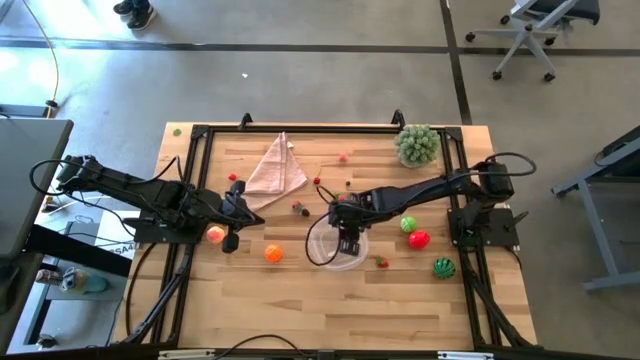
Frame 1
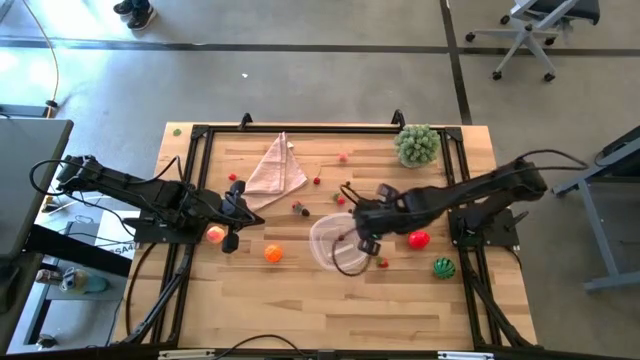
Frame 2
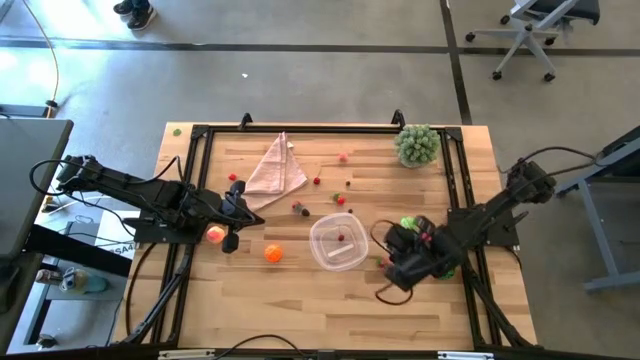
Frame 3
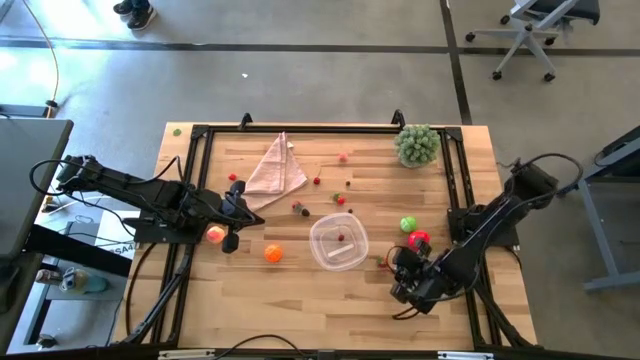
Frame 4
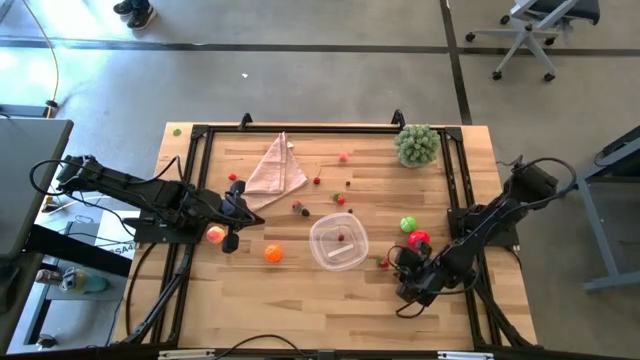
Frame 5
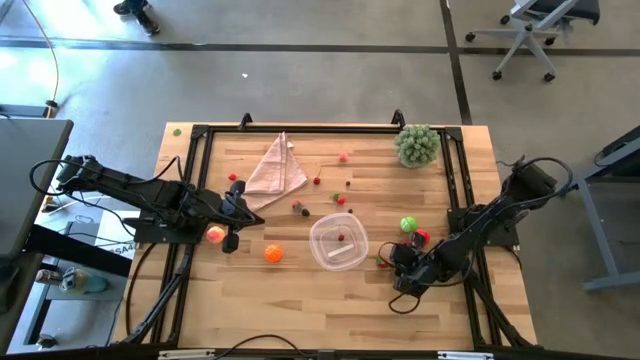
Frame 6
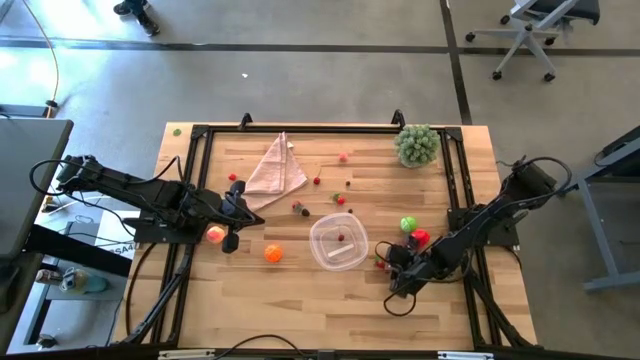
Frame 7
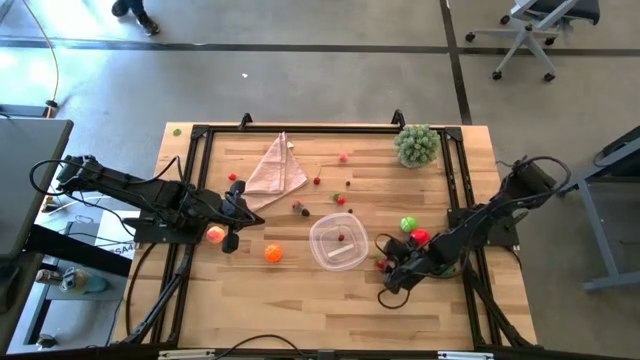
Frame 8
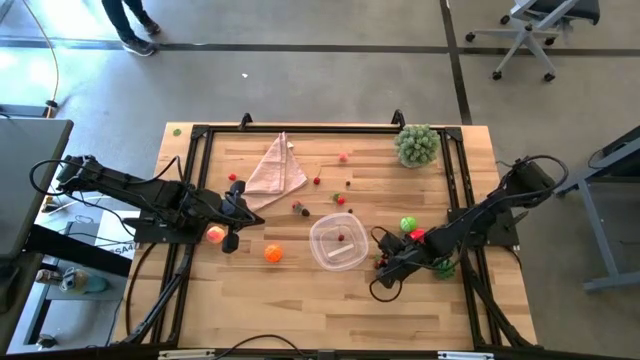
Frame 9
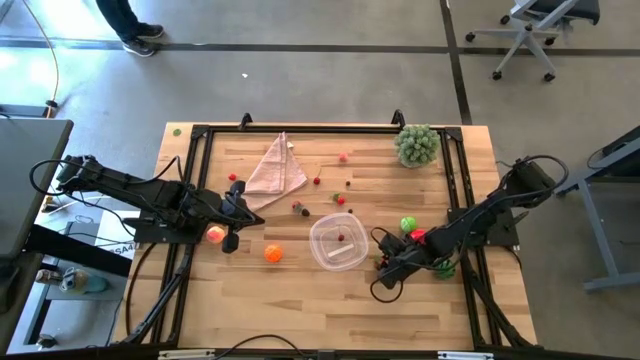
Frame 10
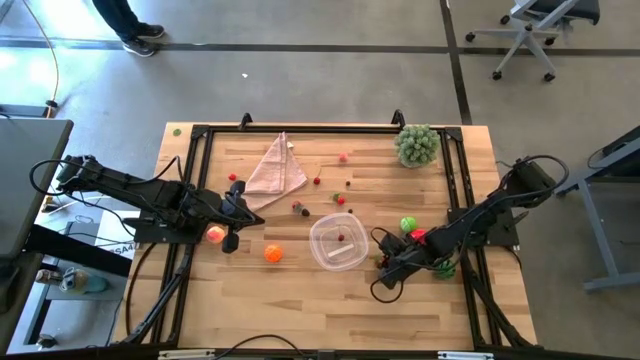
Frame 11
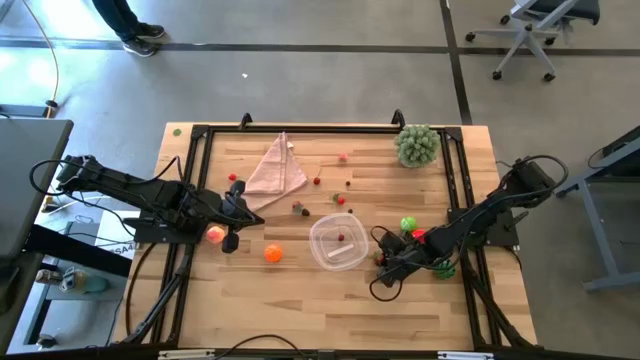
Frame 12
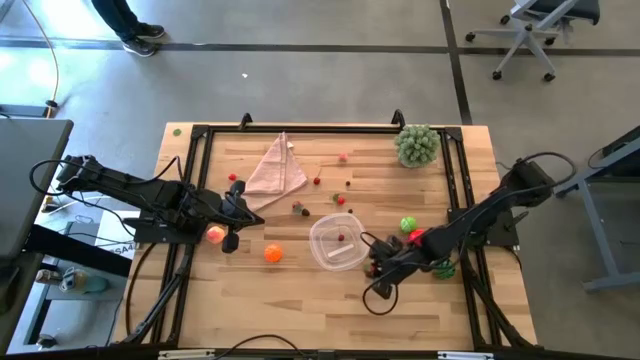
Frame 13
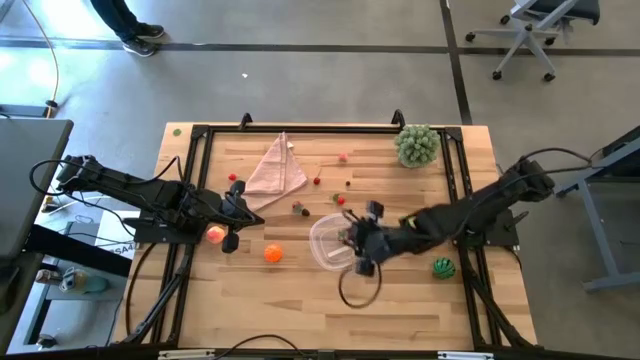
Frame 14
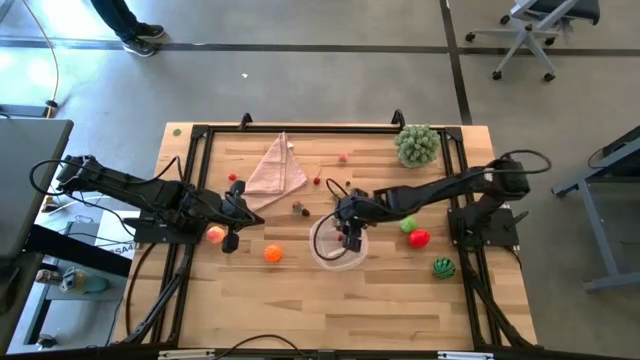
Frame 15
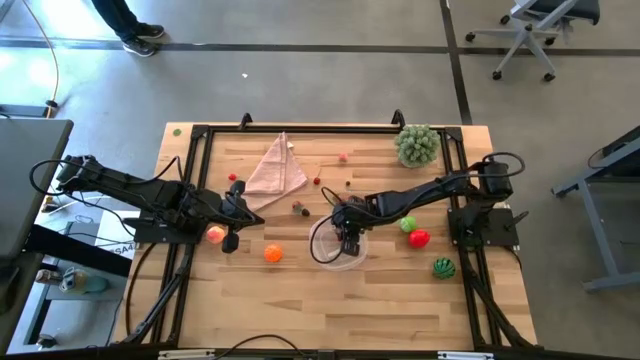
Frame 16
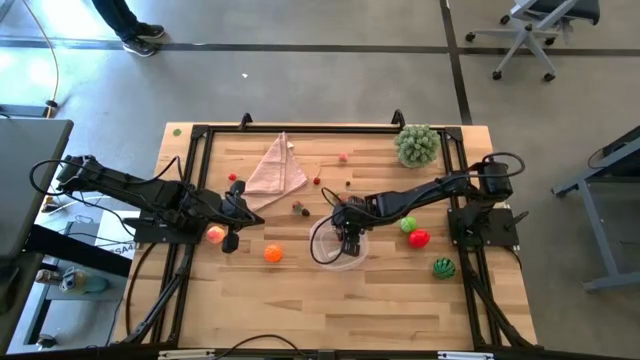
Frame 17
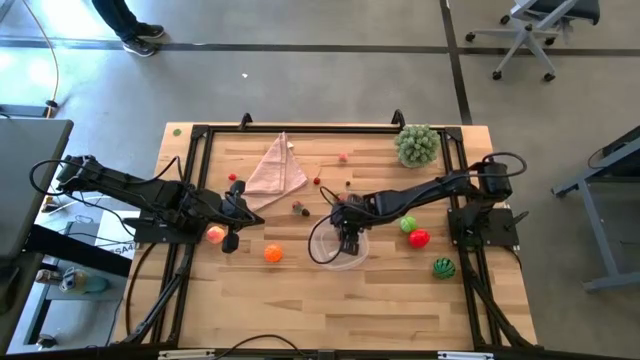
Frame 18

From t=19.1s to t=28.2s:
Task: Pick and placing Produce into tupperware
Put the right strawberry into the transparent bin

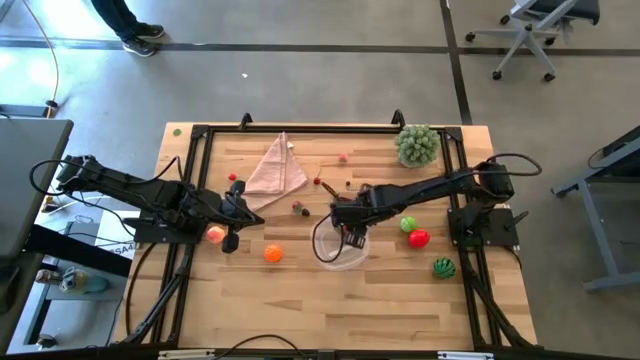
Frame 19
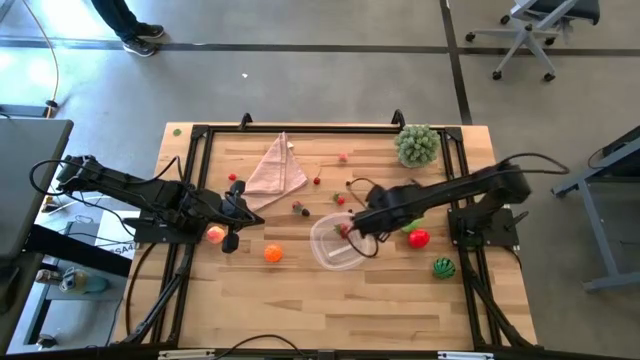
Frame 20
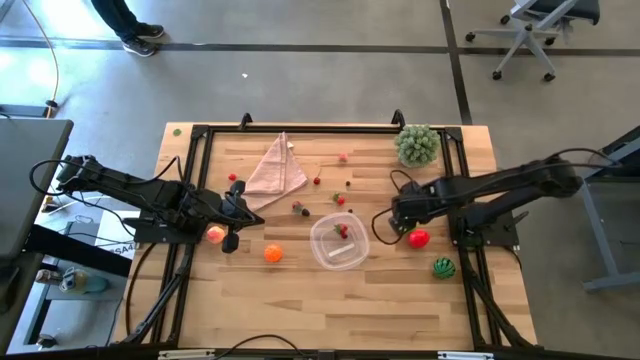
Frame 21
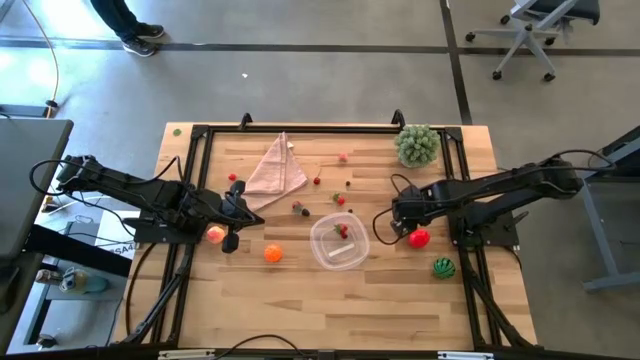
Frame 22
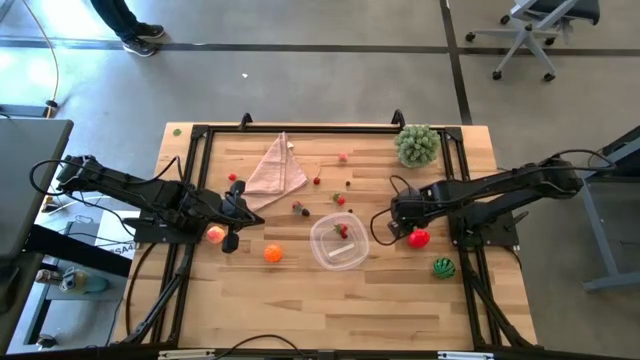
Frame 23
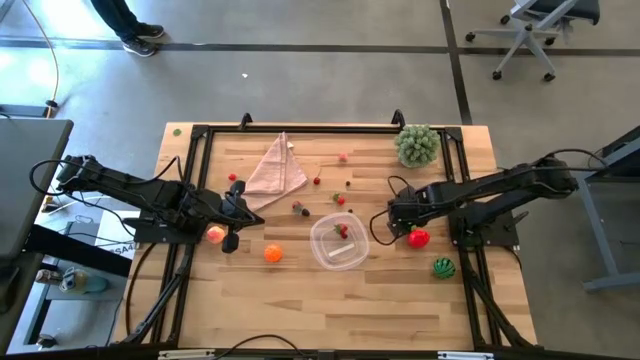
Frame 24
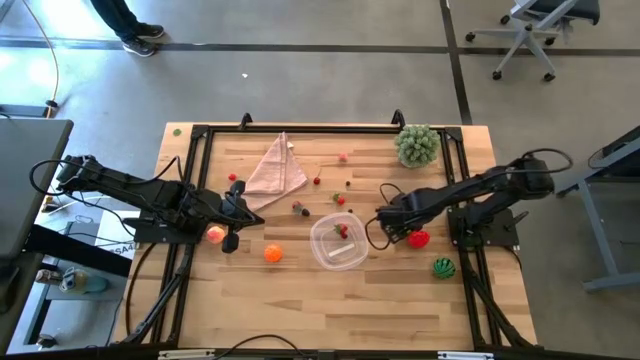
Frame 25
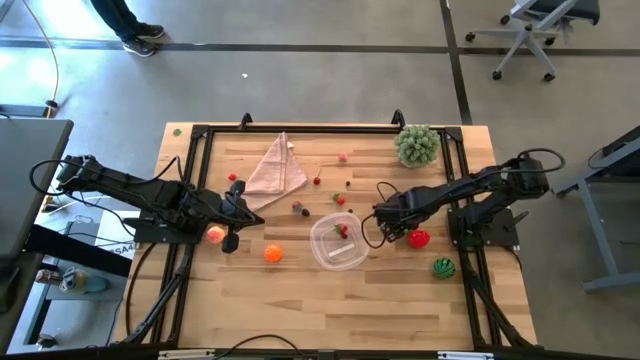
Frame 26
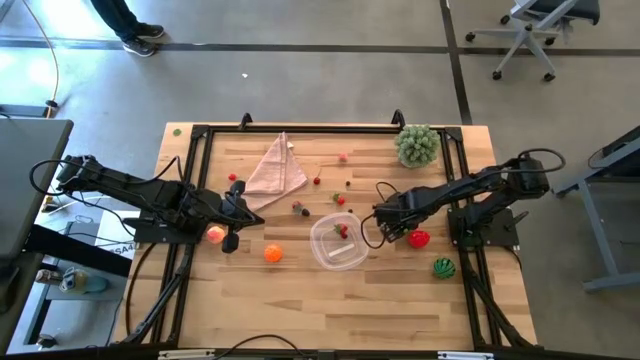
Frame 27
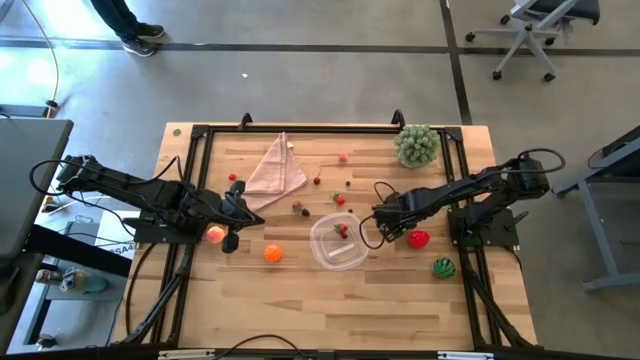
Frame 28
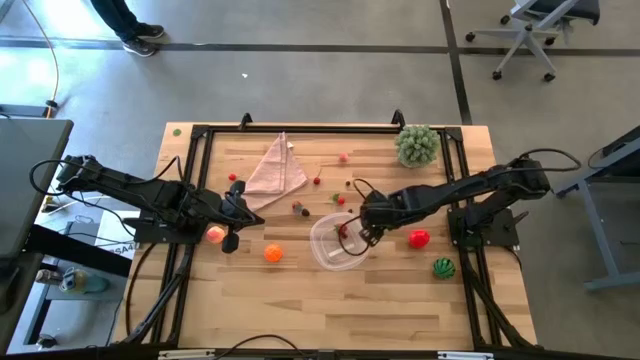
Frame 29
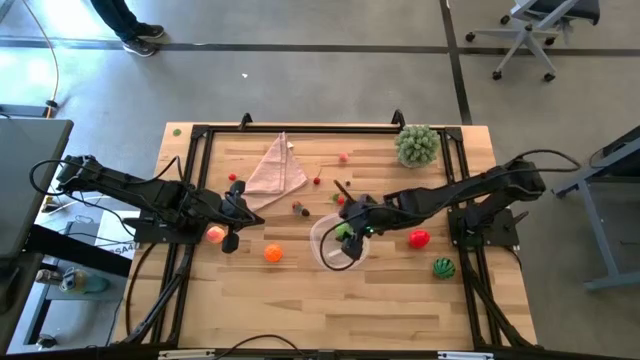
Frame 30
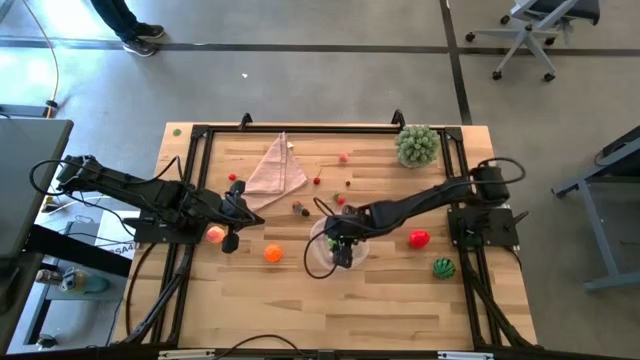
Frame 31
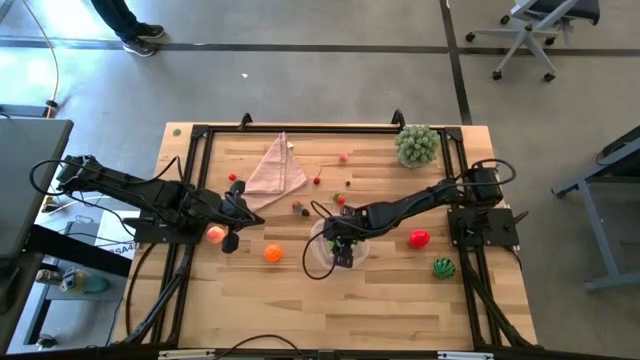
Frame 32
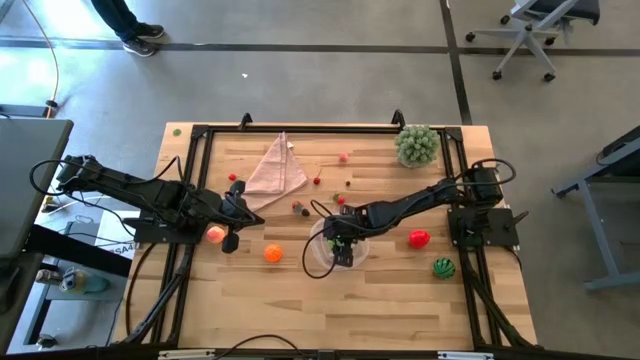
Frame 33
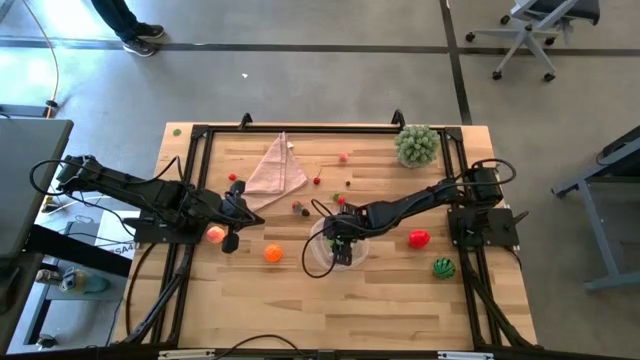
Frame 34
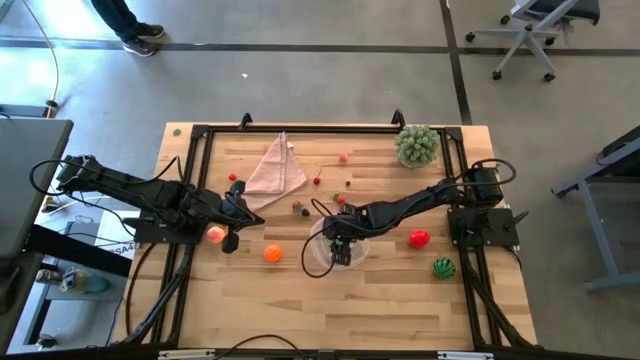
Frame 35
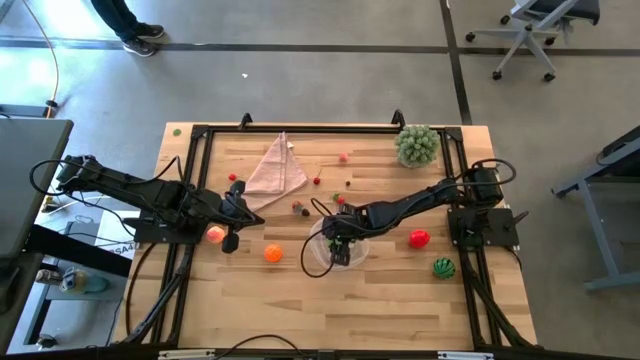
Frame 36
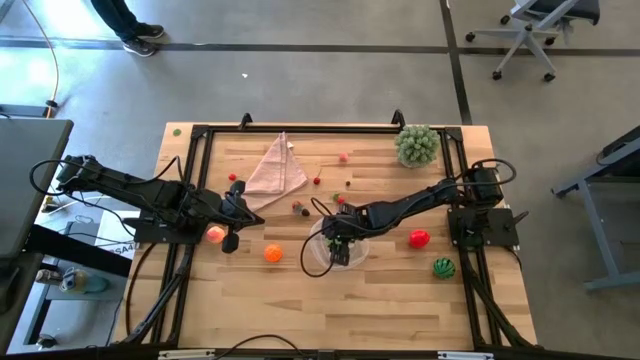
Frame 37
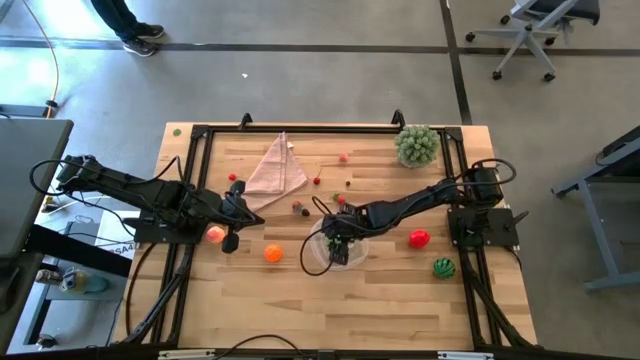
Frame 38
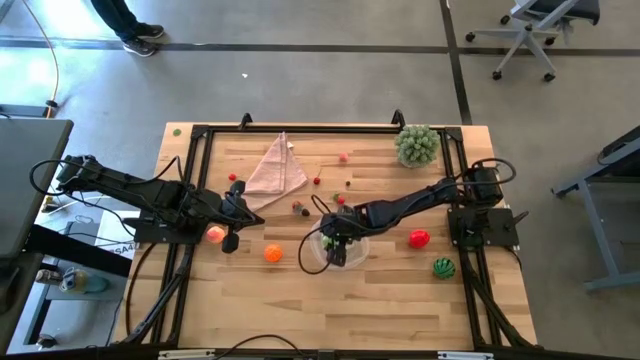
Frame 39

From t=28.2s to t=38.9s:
Put the cabbage into the transparent bin

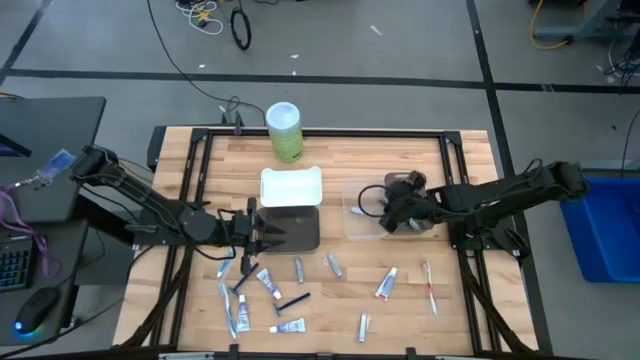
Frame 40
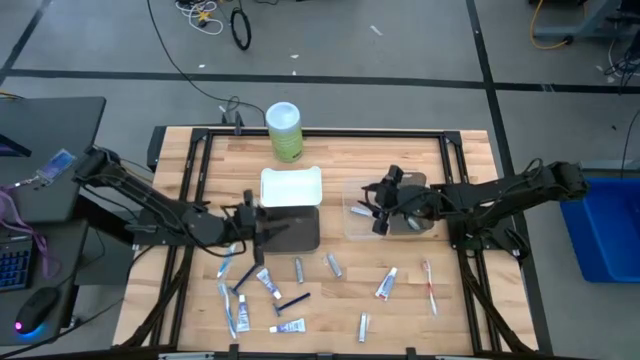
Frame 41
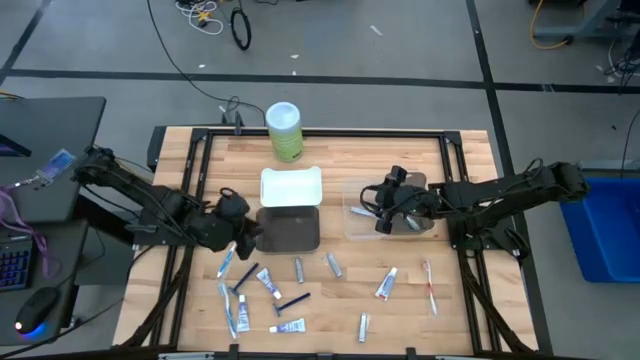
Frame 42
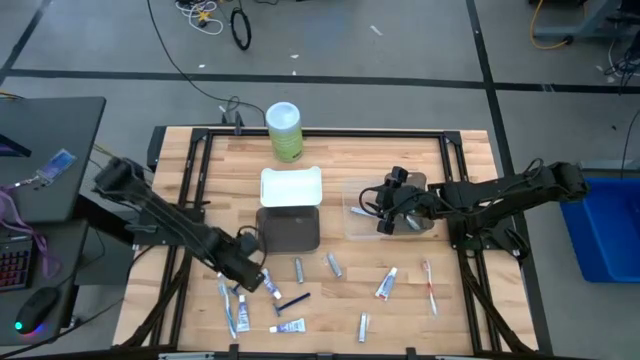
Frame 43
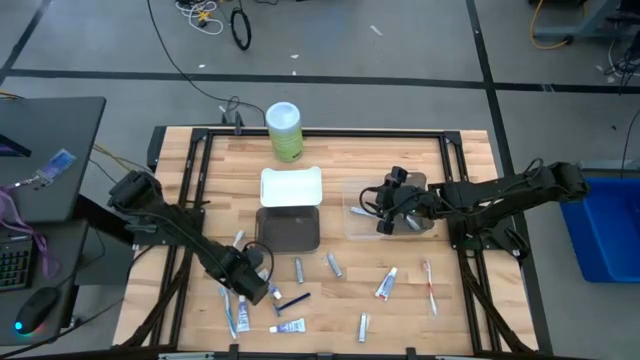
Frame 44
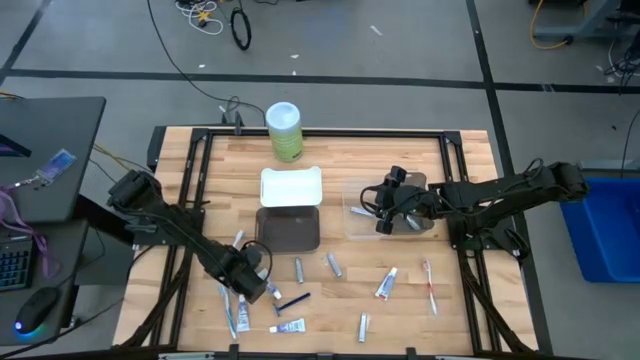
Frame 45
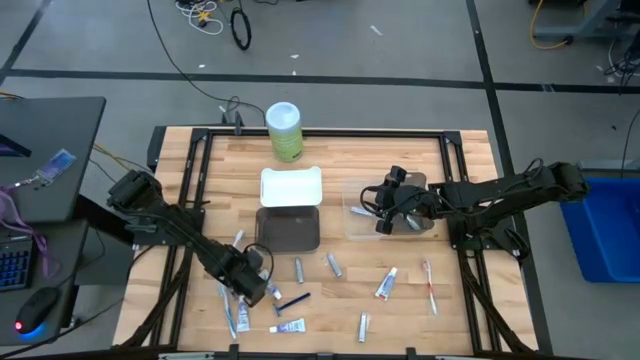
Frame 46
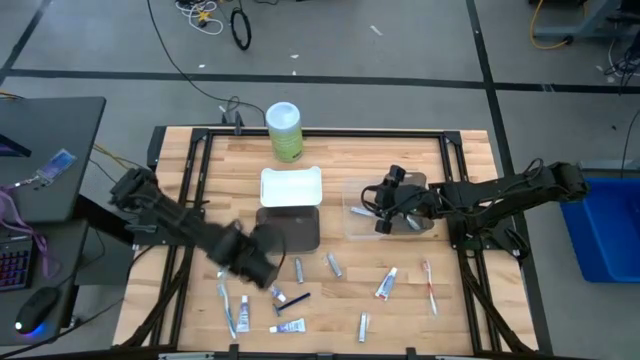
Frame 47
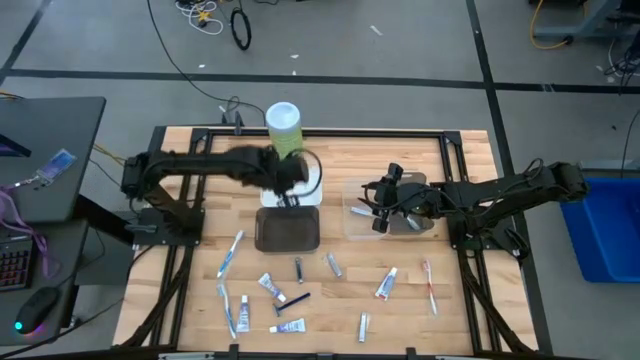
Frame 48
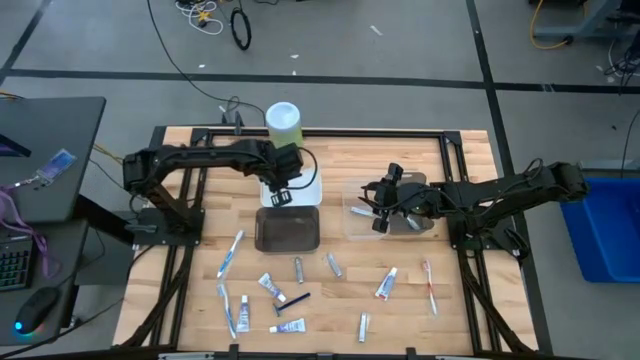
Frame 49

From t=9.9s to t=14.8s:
Task: Pick & Place Travel size toiletries
Put the blue razor into the white bin
